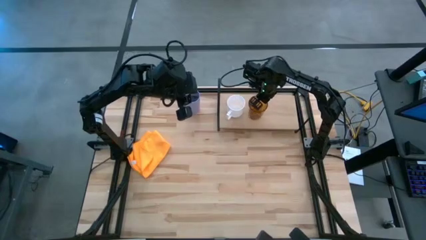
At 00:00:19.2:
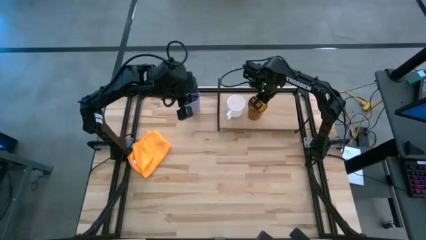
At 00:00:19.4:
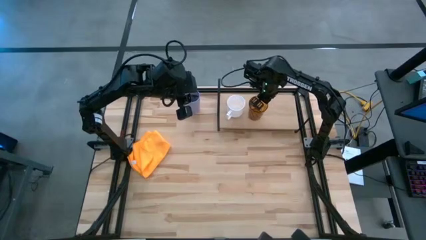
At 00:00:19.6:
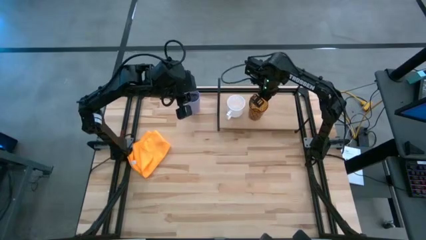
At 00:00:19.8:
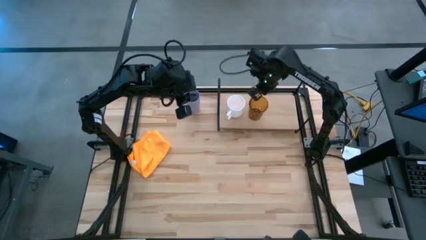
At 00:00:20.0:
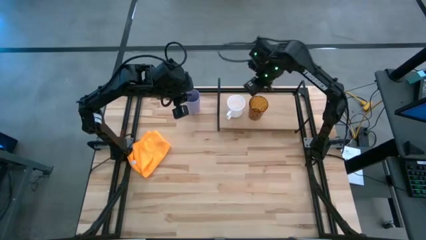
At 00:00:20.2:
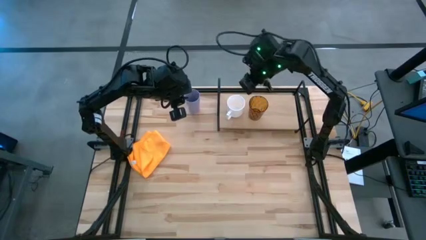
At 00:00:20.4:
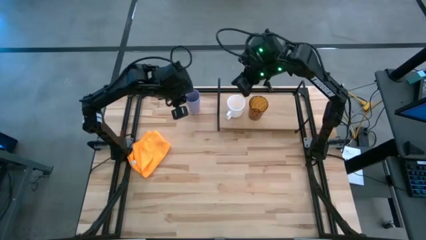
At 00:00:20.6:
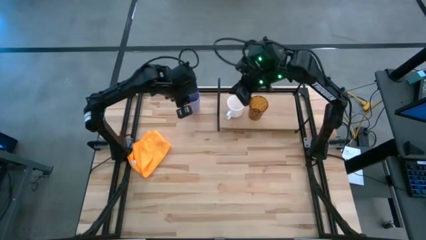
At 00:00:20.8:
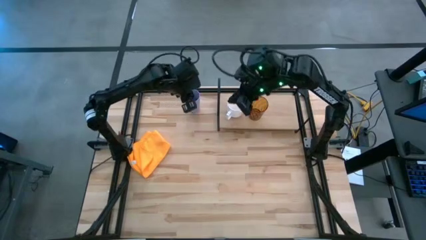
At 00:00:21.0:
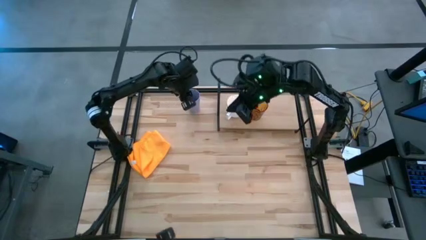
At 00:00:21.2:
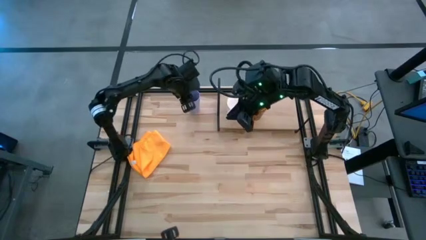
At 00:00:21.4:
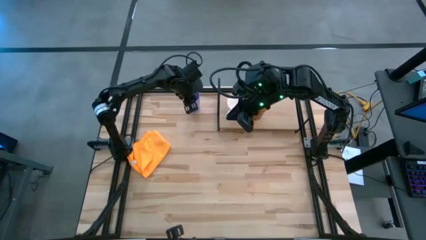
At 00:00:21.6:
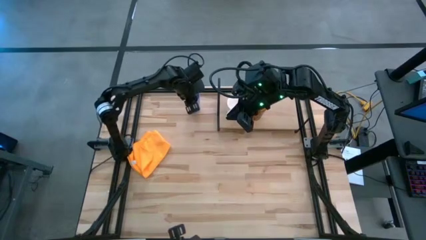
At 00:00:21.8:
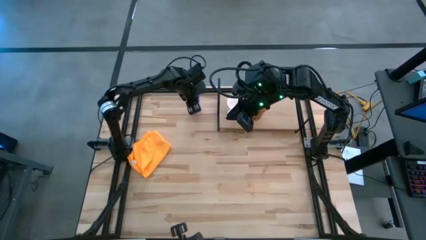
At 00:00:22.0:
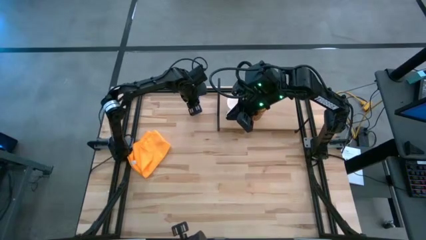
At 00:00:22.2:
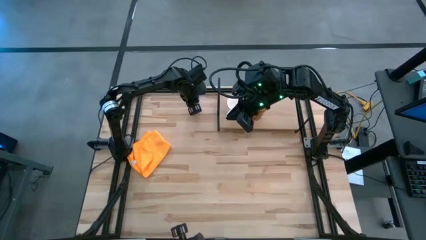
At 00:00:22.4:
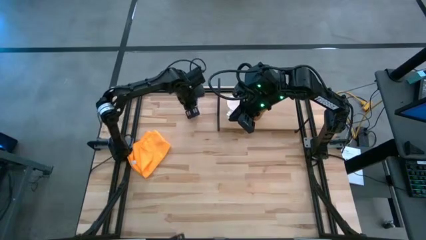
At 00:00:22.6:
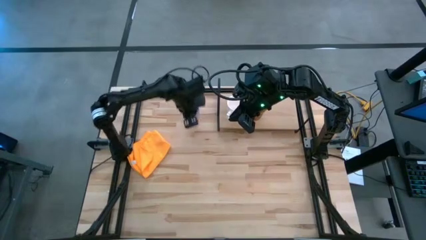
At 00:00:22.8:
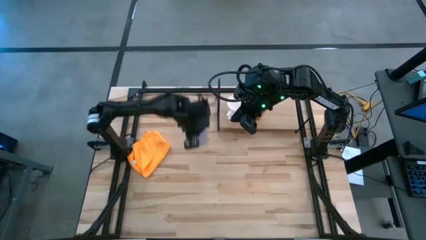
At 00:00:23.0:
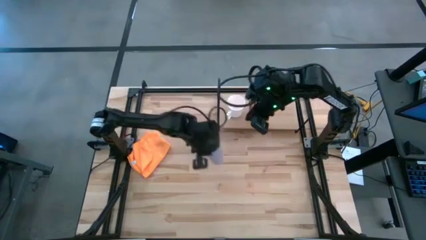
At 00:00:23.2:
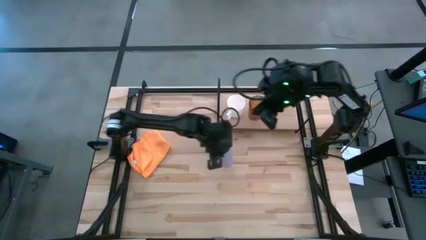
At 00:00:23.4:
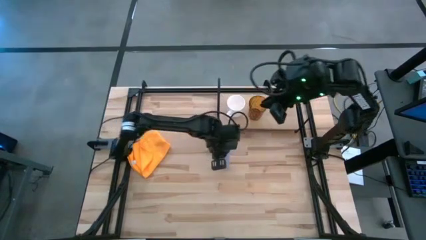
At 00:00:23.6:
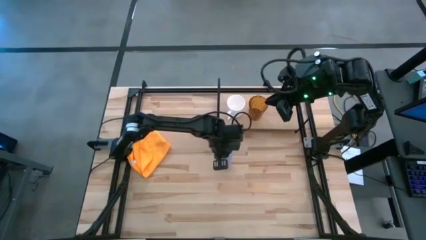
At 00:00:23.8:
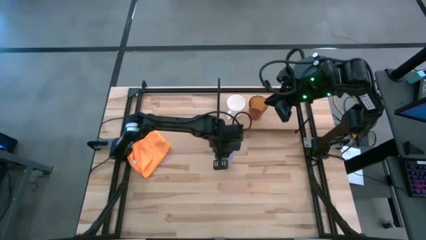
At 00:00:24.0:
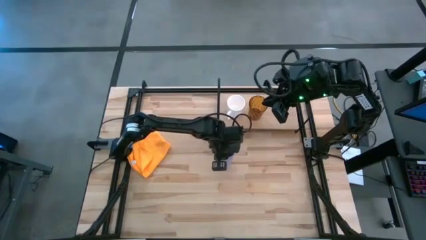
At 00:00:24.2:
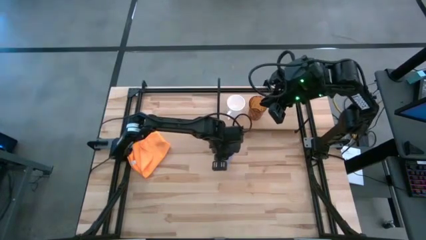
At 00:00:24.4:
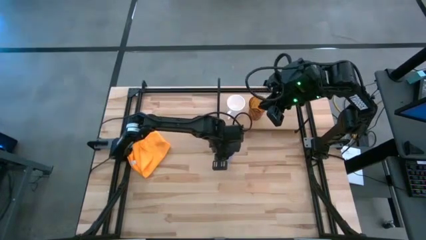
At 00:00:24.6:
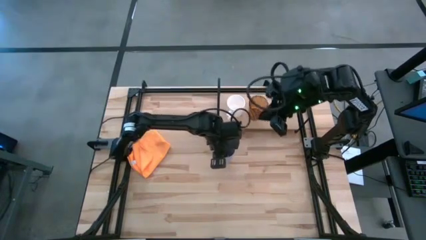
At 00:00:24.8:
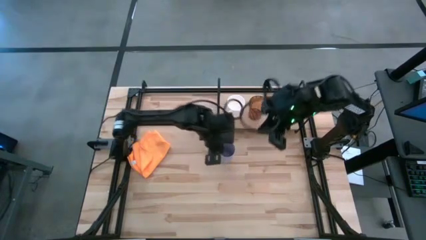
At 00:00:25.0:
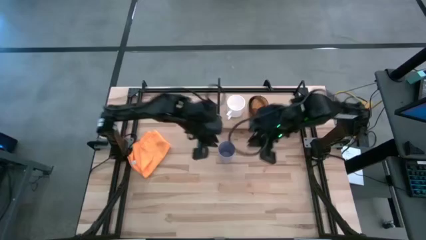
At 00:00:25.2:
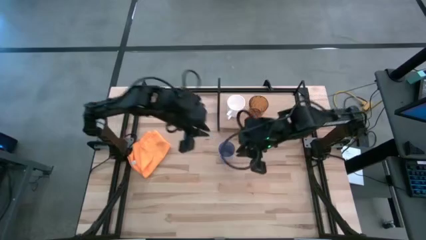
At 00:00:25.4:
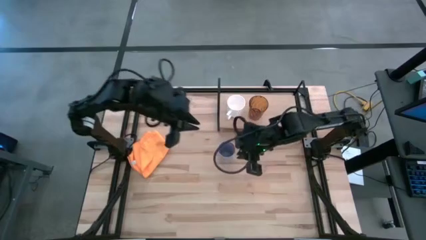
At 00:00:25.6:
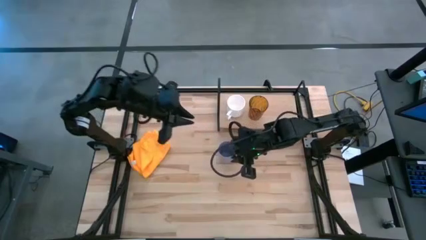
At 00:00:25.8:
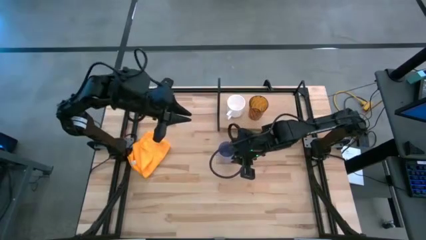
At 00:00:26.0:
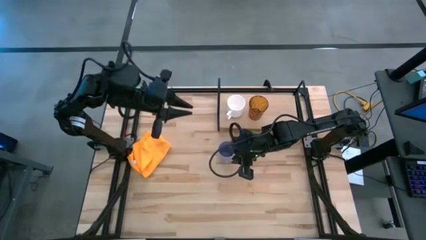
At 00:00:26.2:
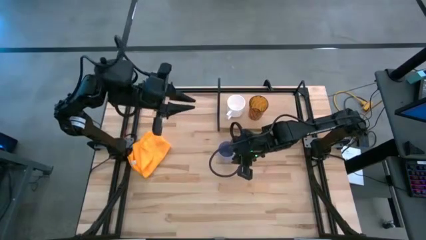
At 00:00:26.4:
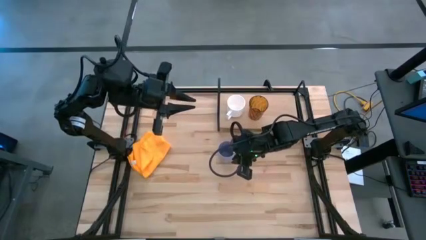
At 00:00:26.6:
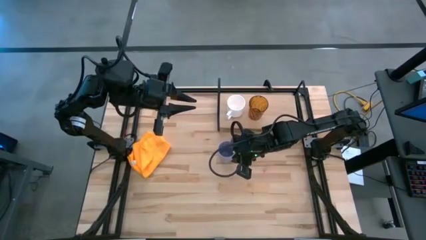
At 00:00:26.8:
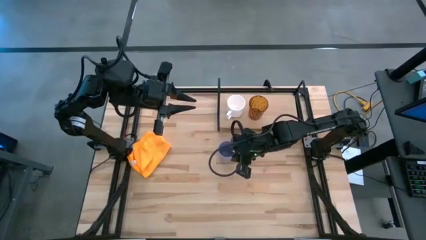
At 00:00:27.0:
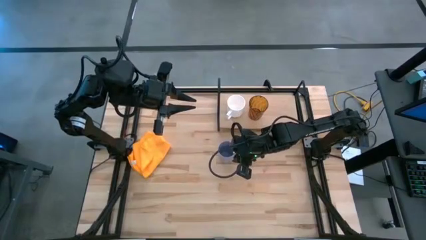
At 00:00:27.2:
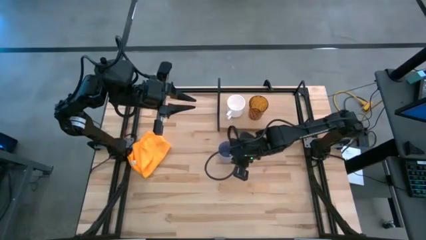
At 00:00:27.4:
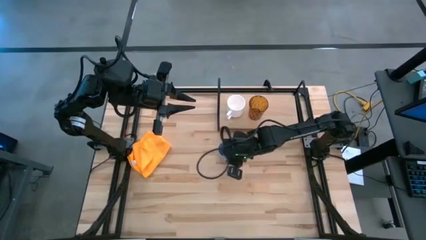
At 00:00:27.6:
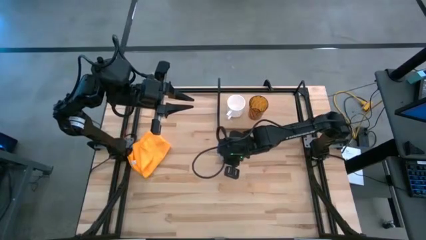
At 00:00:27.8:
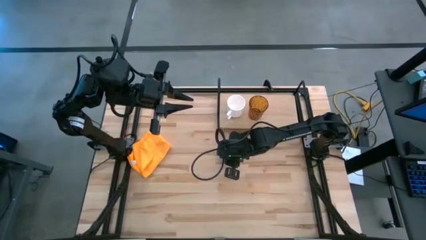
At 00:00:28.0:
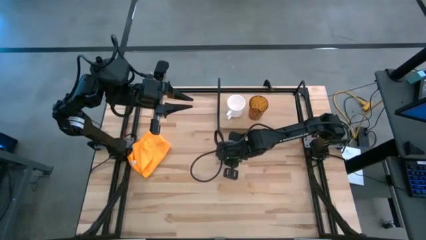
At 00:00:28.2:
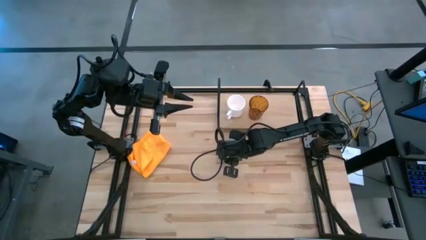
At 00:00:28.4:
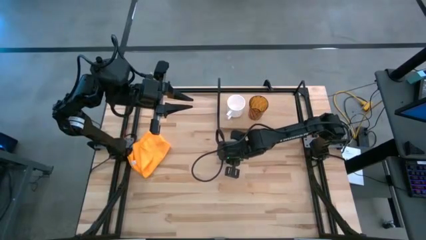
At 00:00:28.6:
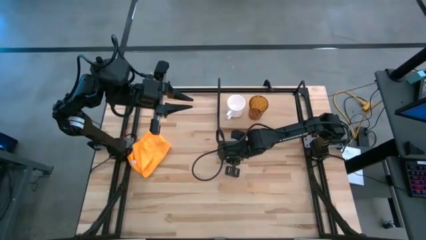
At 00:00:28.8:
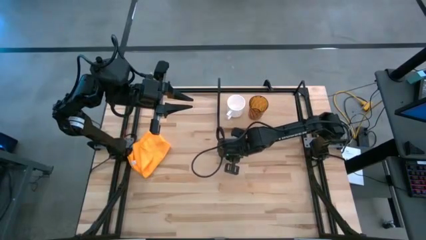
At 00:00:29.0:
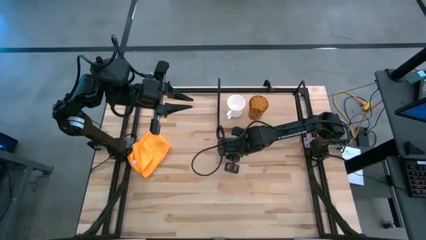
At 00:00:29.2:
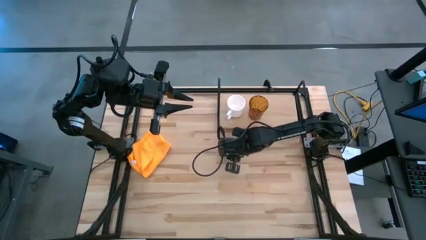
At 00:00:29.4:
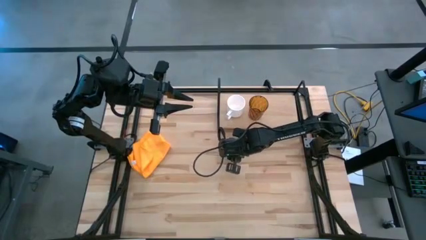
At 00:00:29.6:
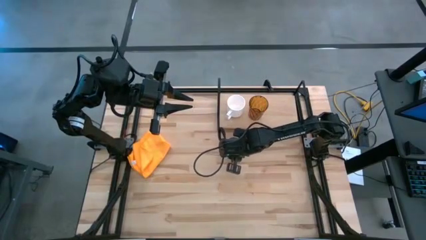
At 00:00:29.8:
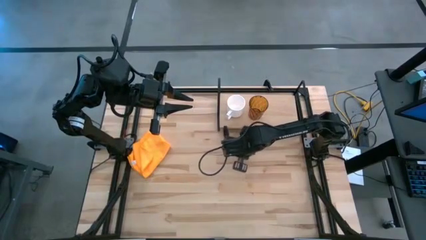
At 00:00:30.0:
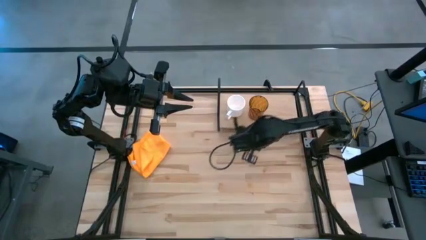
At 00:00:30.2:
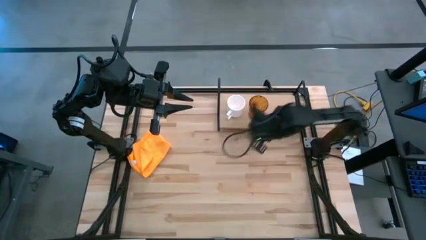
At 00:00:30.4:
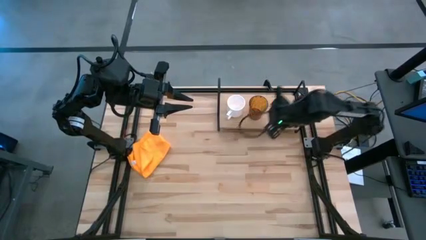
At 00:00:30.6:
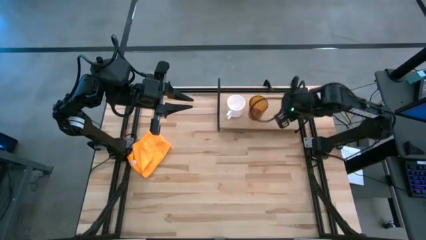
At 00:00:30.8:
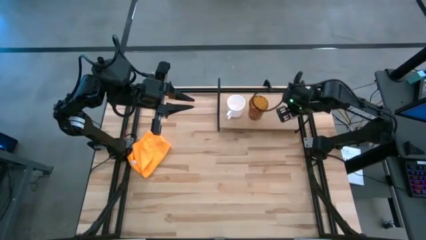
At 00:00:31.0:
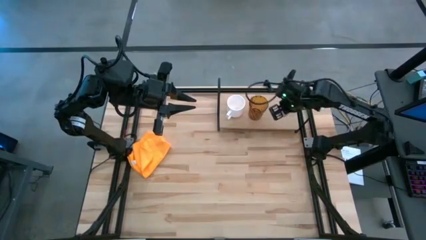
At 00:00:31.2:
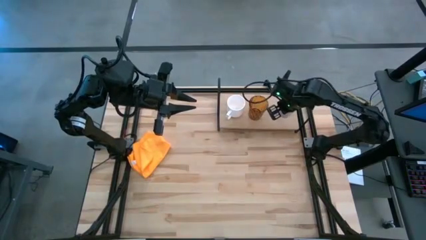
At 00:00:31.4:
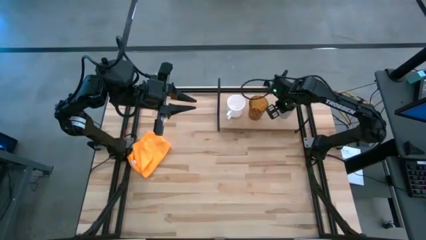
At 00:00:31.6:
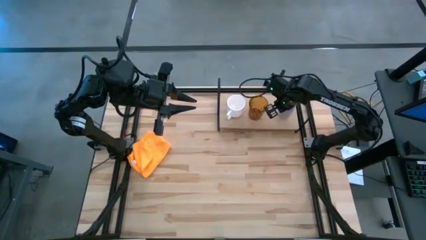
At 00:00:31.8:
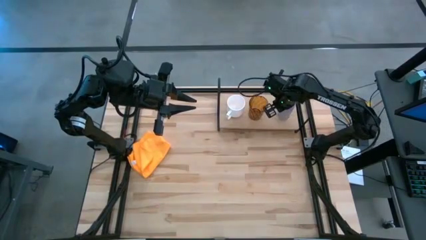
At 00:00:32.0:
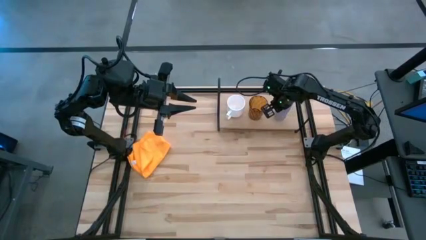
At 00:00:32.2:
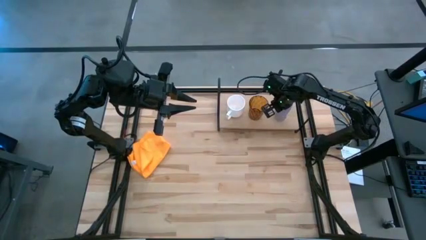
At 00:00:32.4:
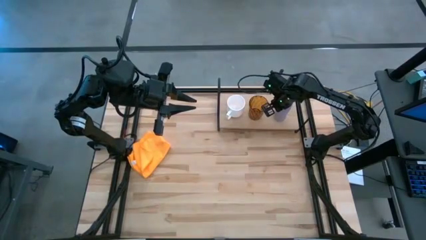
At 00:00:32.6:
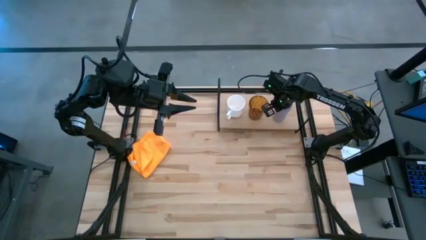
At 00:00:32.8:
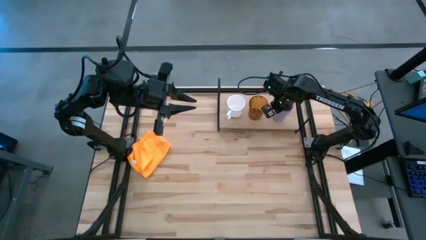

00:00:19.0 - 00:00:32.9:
Task: Stack small to large cups/mugs on shelf
Put the purple cup on the shelf
